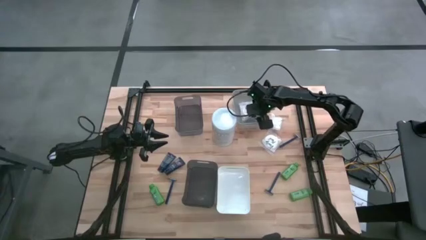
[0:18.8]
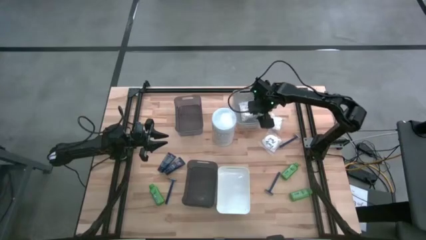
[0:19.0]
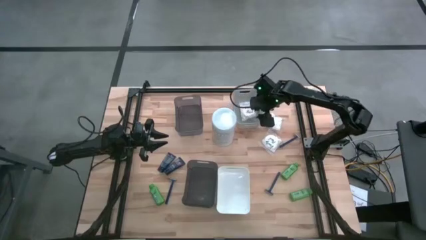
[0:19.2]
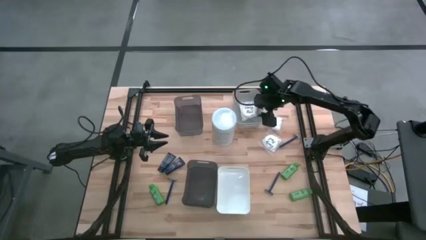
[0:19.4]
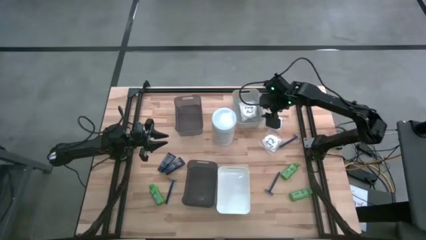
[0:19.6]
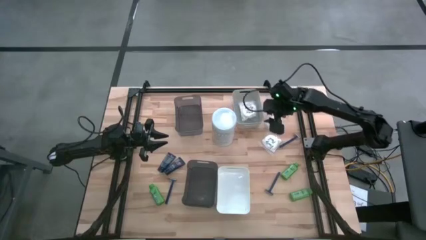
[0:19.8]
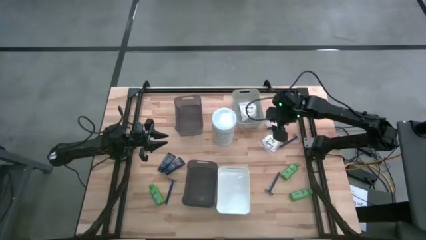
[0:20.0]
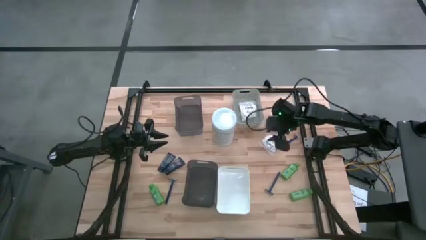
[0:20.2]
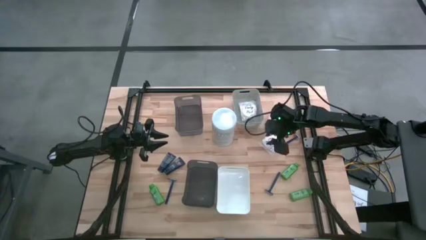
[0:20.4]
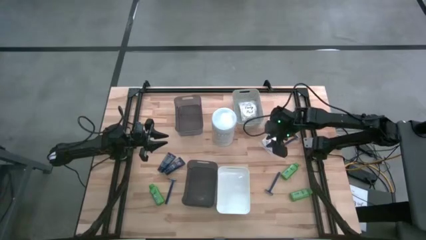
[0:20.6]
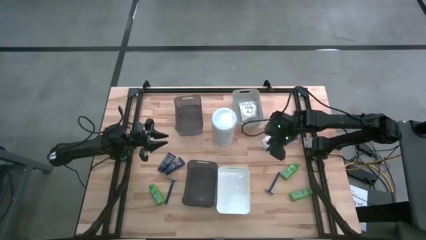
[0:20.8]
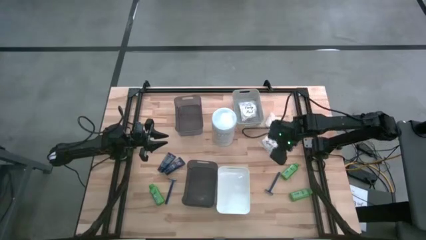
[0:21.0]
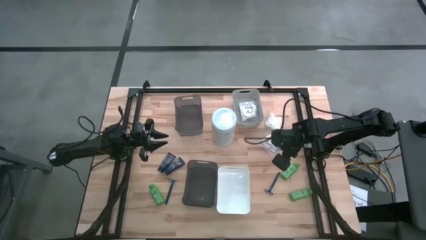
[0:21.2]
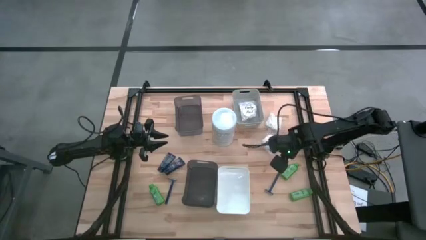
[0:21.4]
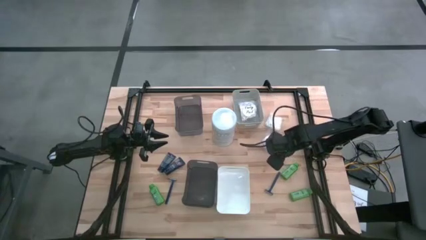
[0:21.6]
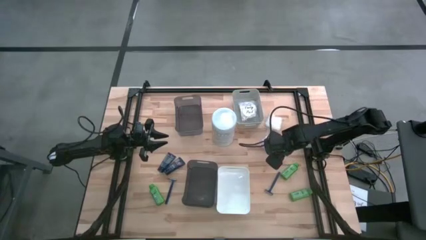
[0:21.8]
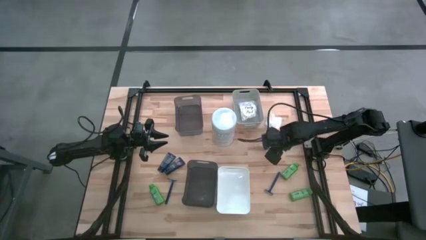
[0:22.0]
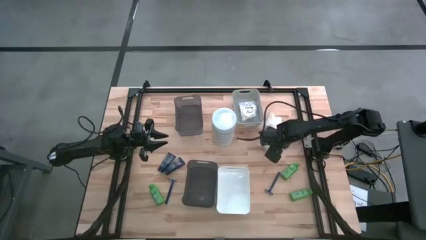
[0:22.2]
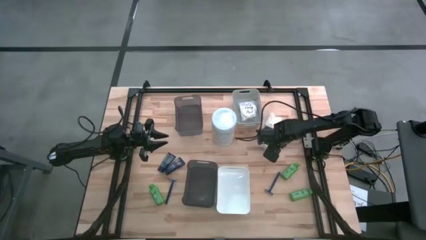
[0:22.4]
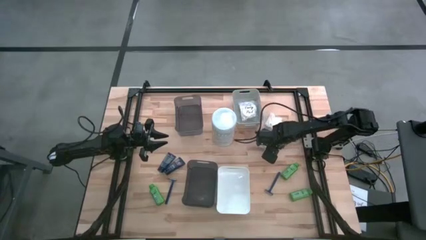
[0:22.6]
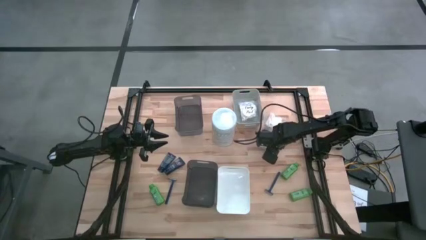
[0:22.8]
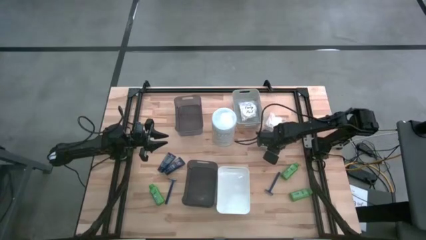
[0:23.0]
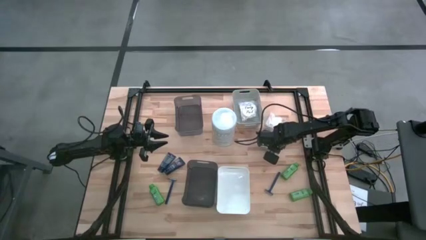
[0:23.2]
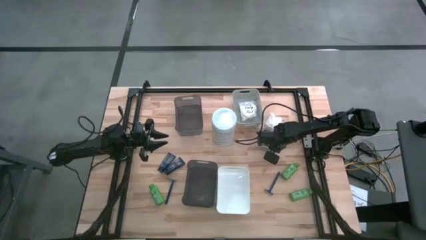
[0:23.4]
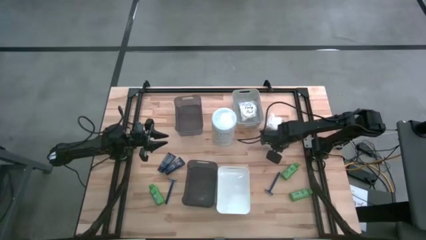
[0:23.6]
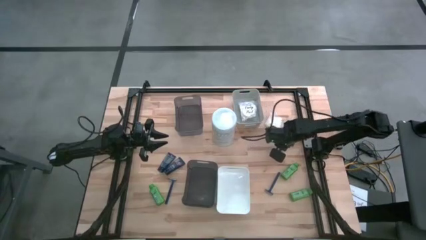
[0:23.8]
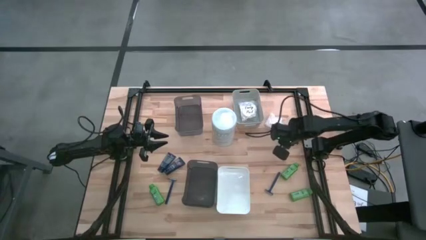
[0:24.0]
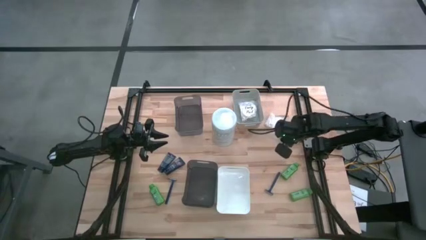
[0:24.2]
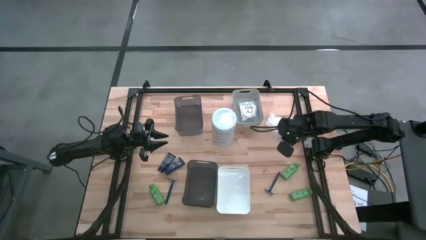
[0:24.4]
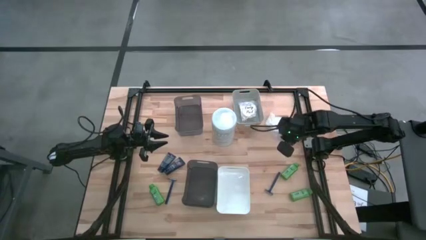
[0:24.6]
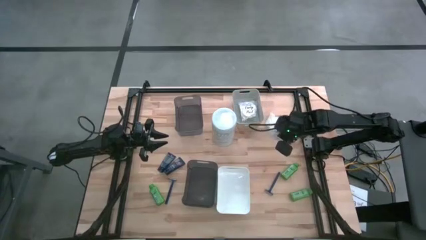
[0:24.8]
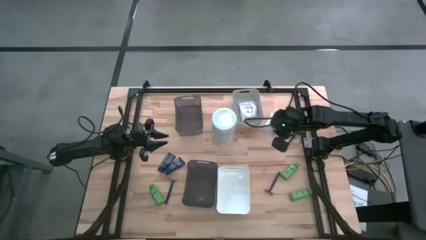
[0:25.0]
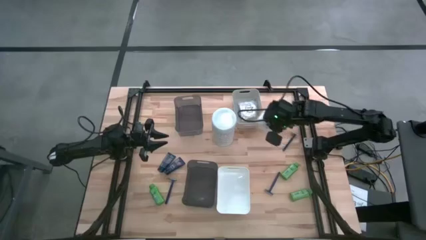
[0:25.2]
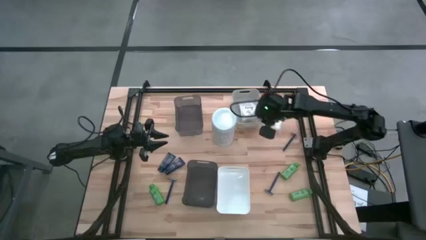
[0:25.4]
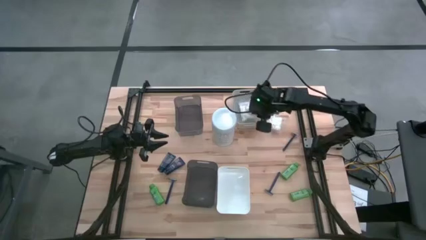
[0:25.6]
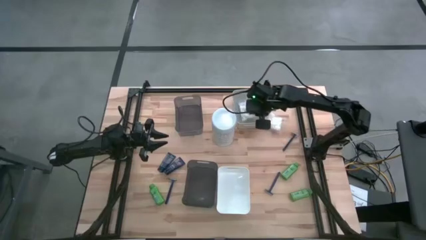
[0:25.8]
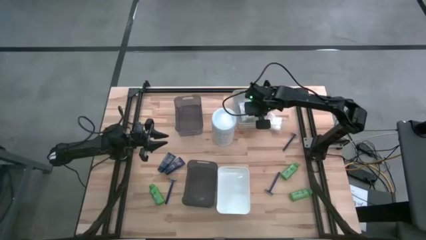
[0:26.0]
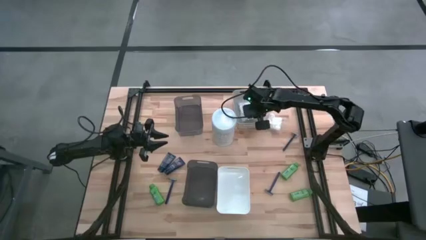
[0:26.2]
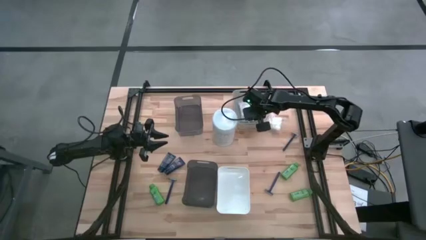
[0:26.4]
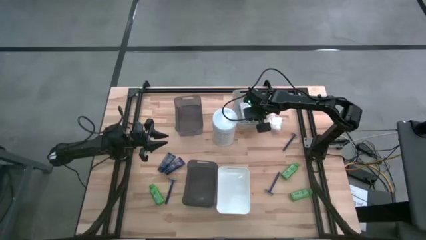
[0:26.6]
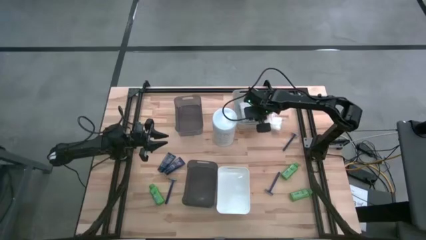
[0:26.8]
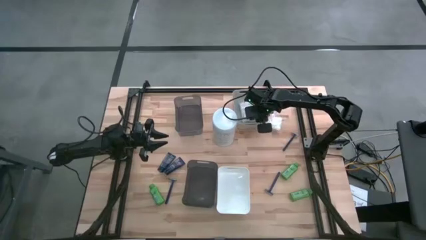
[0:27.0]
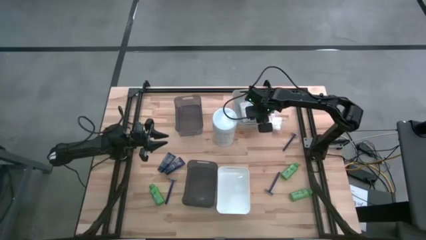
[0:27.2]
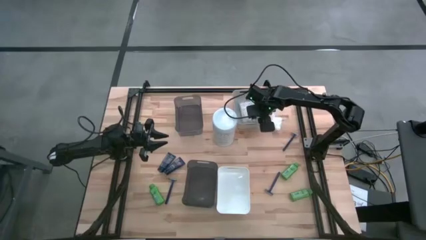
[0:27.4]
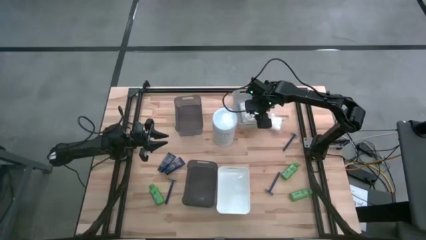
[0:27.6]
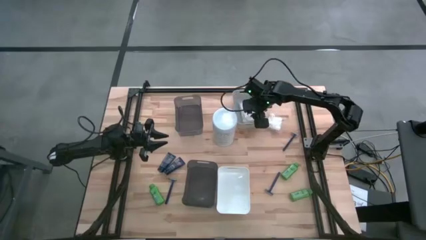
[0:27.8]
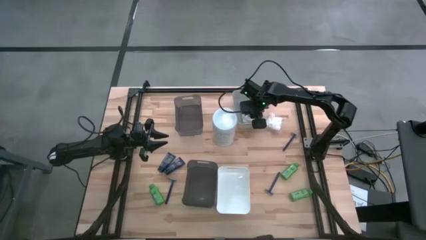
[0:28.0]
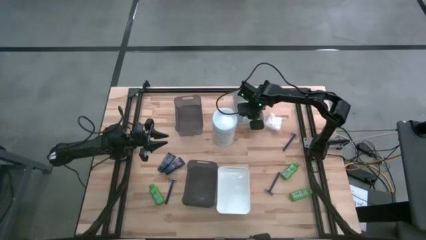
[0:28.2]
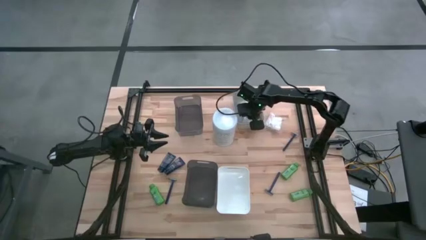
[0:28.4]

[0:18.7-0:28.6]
Task: Pick & Place Travel size toiletries
Put the white cotton pack into the gray bin

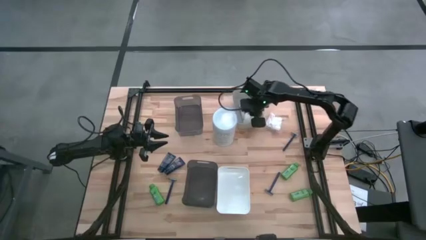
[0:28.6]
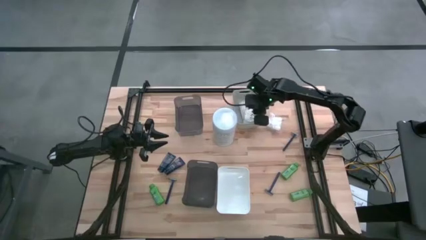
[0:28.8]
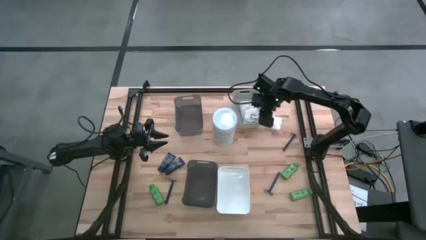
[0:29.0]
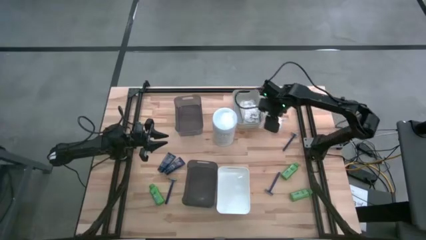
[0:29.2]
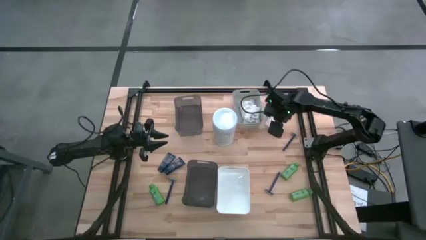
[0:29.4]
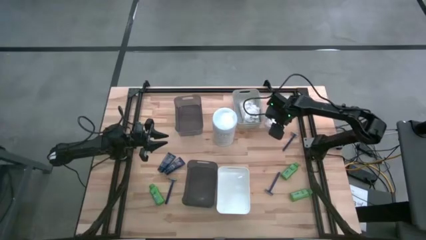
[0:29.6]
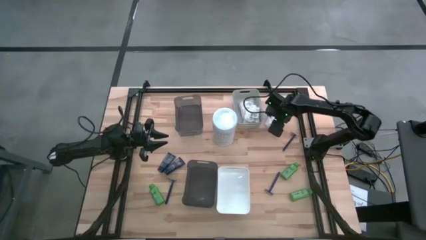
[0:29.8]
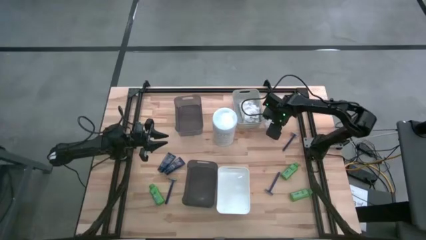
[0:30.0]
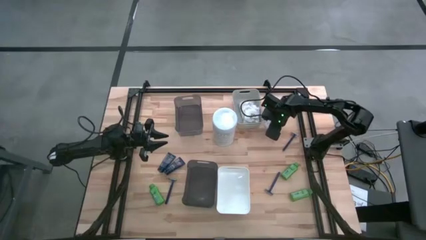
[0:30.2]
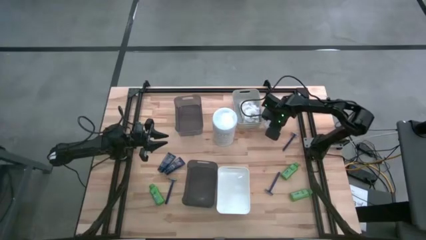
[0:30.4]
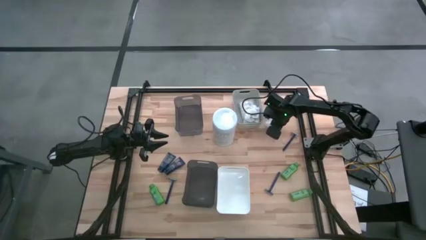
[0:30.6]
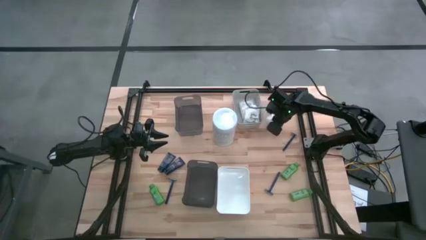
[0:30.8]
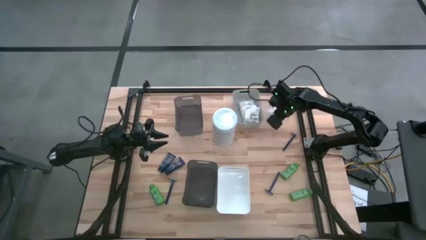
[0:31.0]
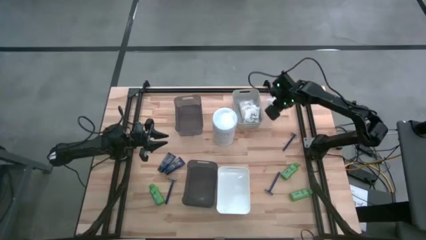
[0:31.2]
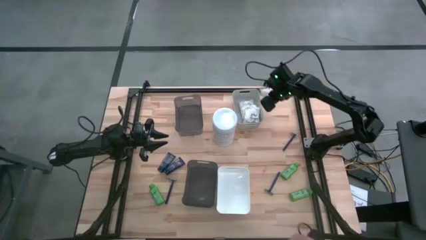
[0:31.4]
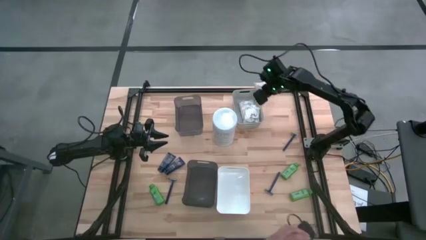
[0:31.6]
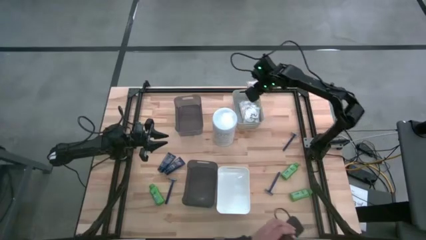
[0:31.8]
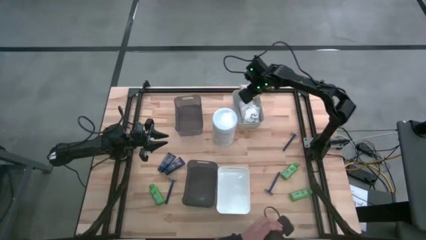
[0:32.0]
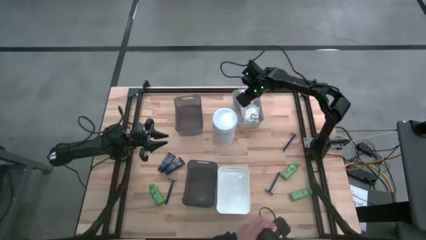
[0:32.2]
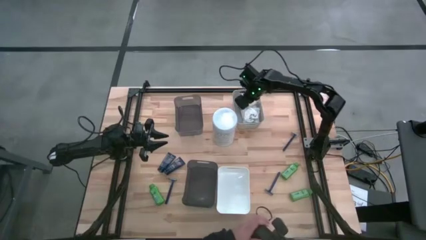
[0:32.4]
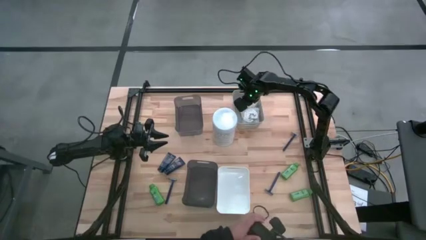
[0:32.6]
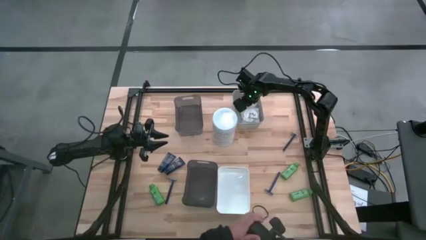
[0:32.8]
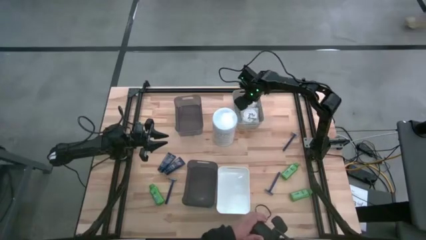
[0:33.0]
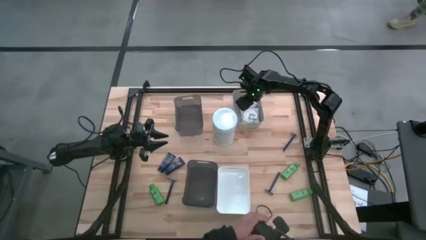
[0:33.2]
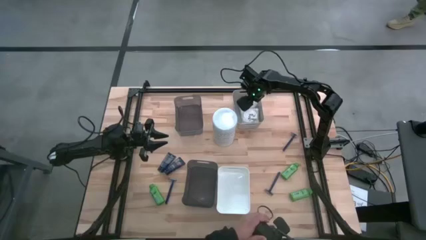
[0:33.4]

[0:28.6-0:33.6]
Put the white cotton pack into the gray bin

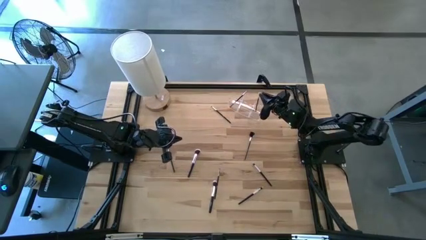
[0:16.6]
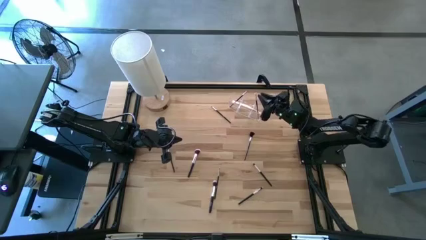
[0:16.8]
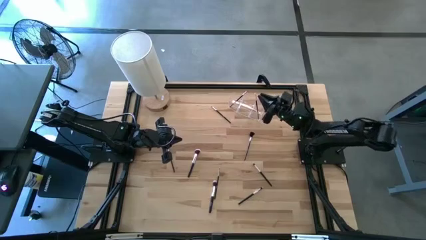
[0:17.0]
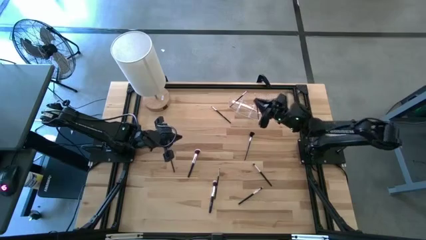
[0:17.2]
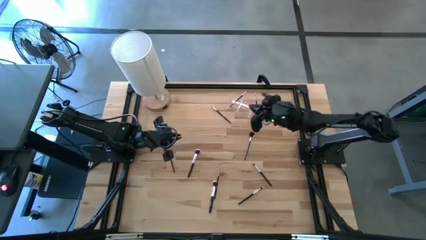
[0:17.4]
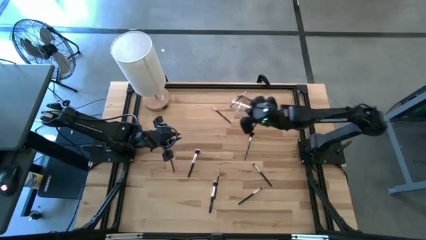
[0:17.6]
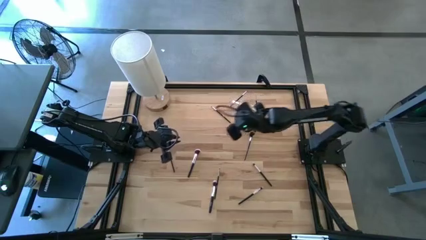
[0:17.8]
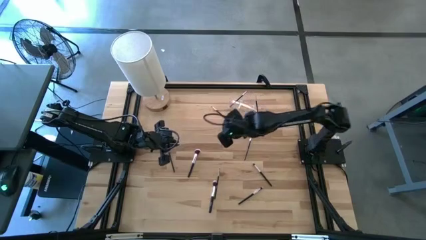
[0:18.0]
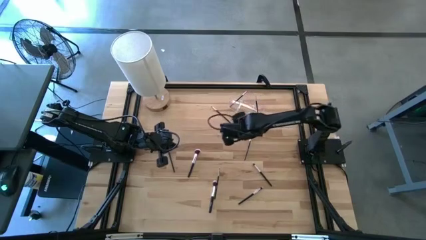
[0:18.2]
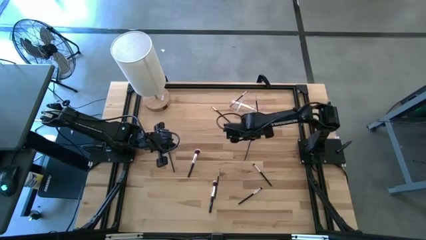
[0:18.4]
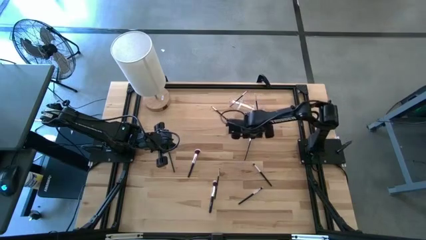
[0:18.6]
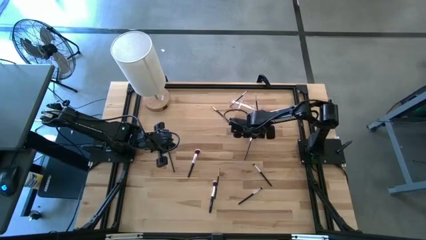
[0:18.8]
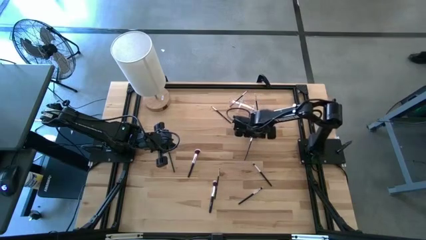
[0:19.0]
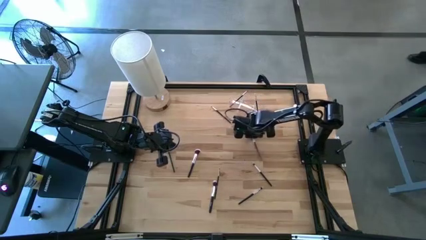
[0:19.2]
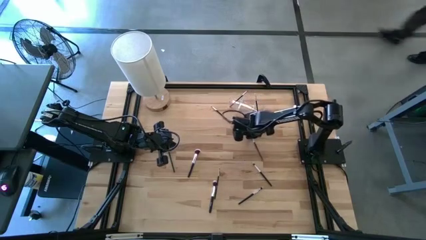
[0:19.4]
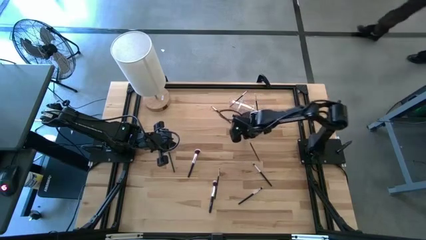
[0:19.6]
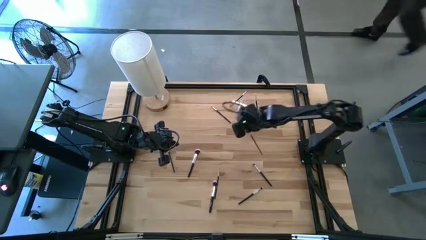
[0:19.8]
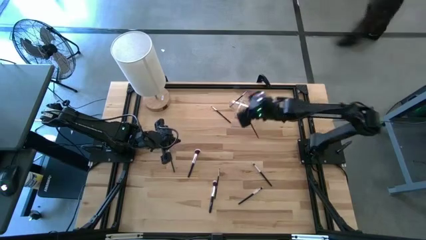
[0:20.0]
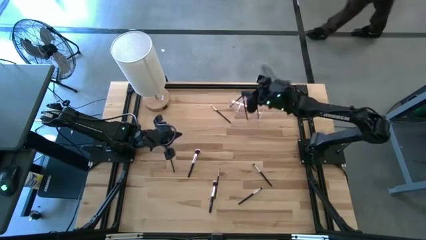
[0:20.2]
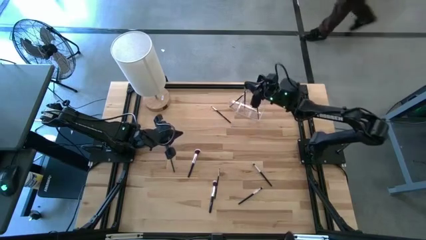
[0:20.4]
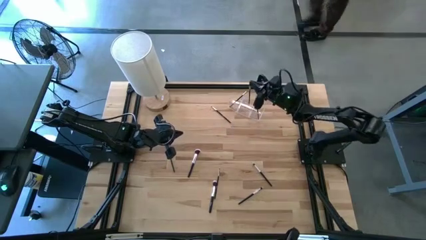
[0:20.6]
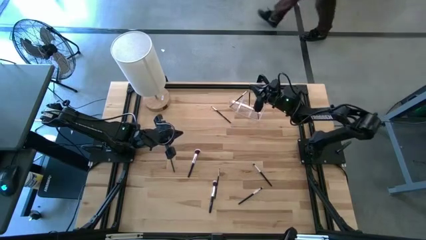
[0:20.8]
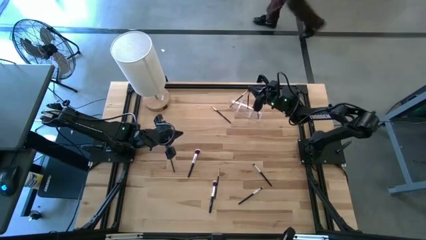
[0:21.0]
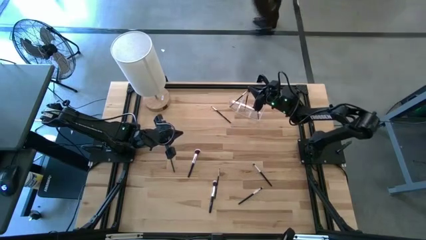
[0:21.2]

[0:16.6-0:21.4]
Task: Pick & Place Makeup Brushes
Put the black makeup brush into the transparent organizer
